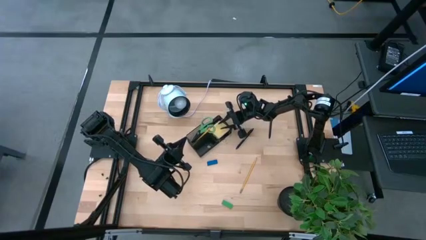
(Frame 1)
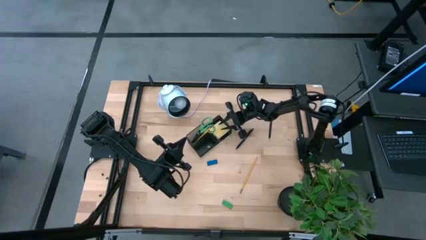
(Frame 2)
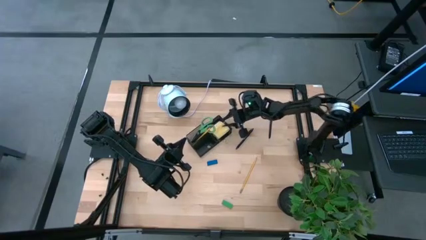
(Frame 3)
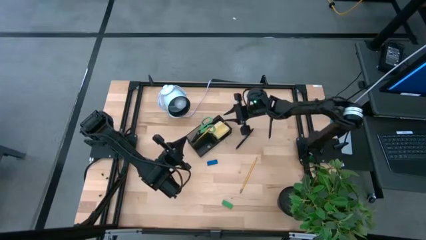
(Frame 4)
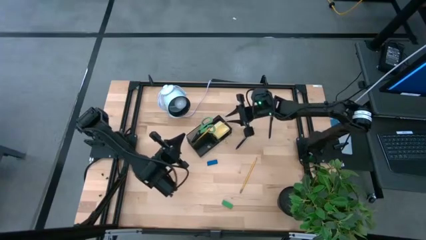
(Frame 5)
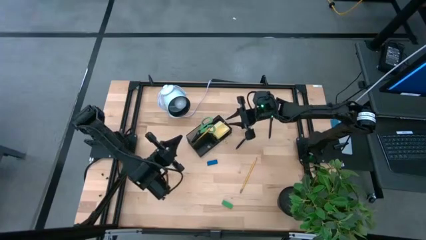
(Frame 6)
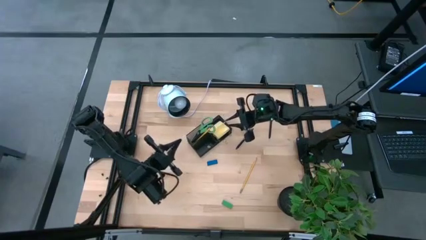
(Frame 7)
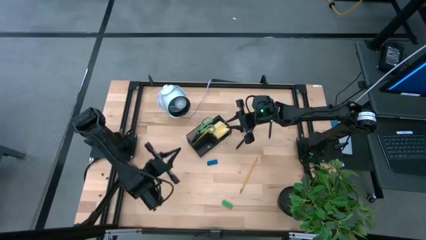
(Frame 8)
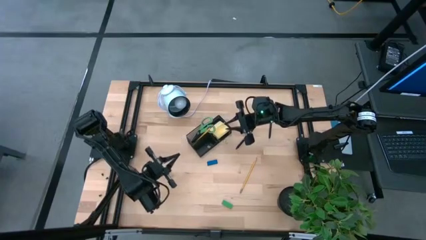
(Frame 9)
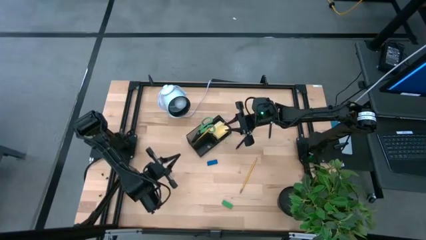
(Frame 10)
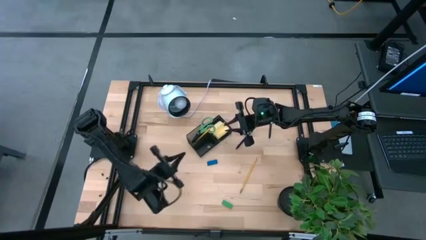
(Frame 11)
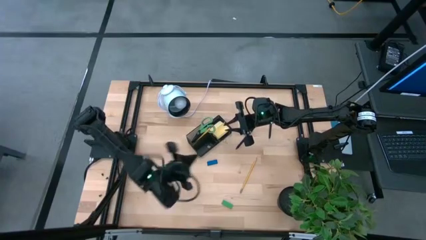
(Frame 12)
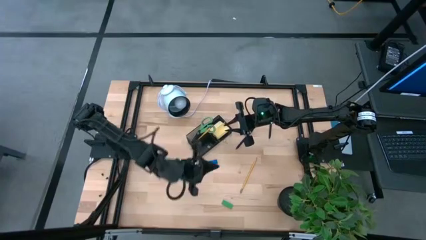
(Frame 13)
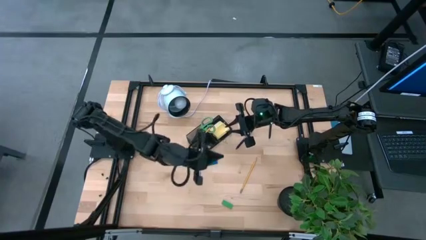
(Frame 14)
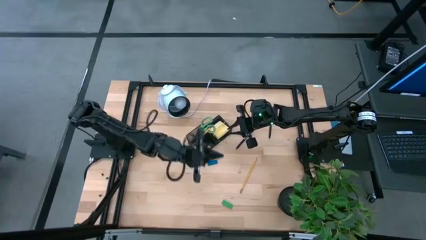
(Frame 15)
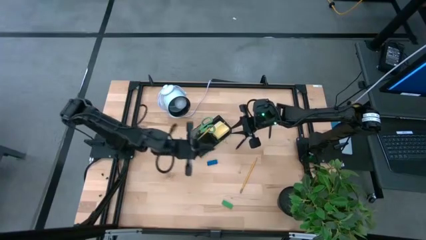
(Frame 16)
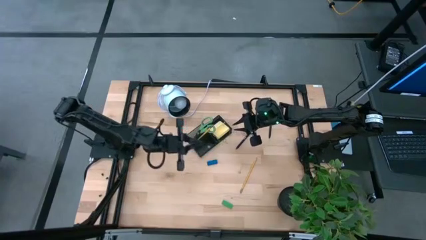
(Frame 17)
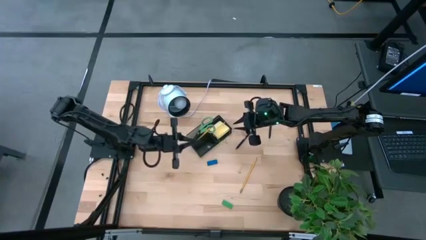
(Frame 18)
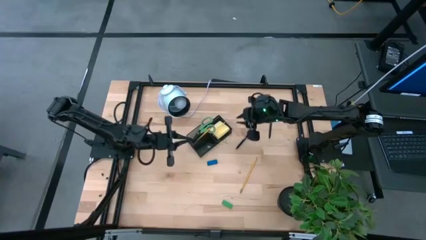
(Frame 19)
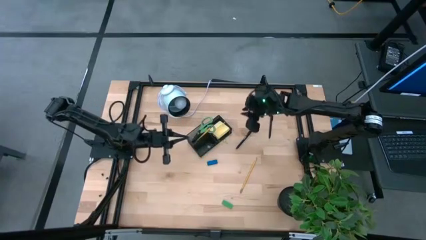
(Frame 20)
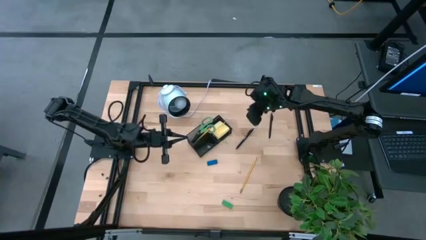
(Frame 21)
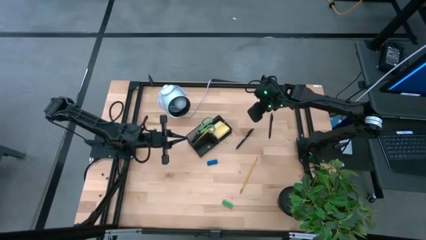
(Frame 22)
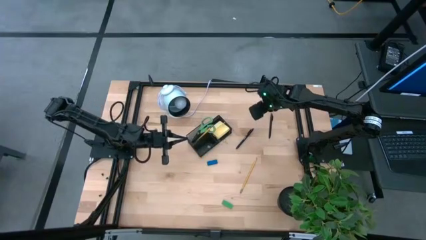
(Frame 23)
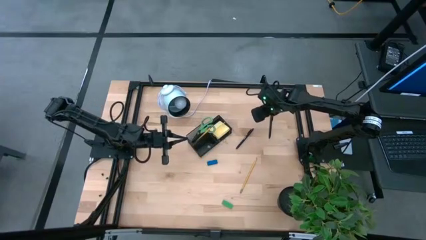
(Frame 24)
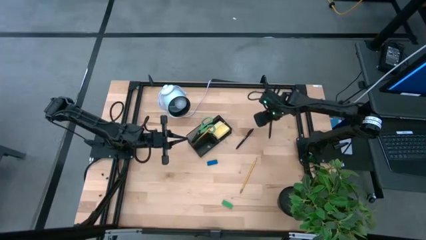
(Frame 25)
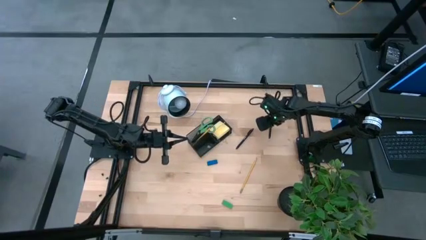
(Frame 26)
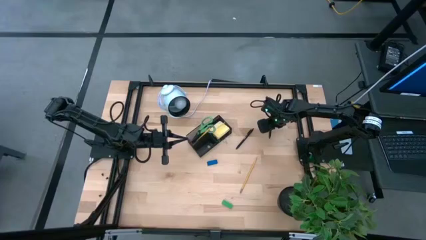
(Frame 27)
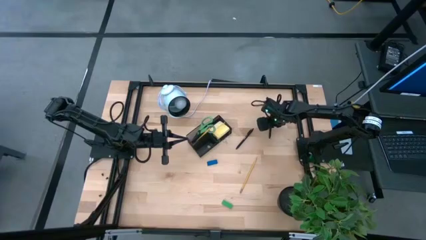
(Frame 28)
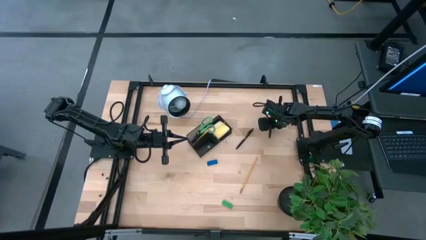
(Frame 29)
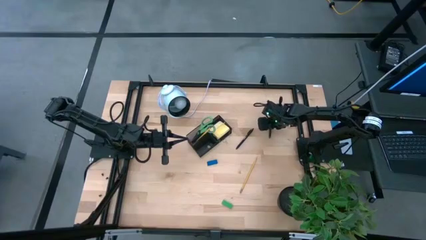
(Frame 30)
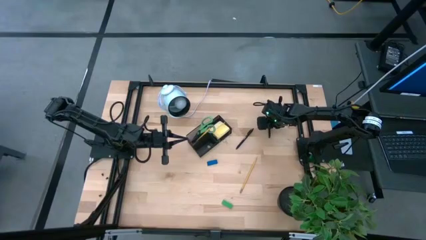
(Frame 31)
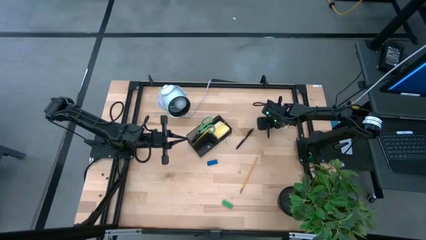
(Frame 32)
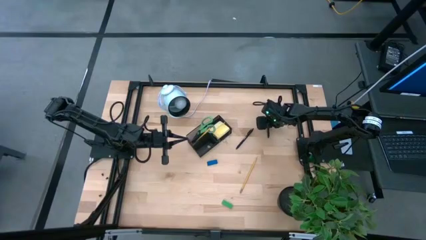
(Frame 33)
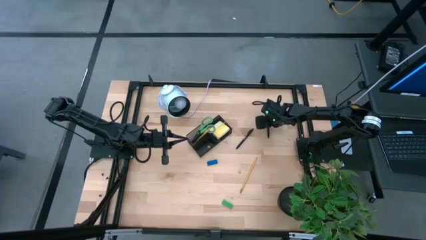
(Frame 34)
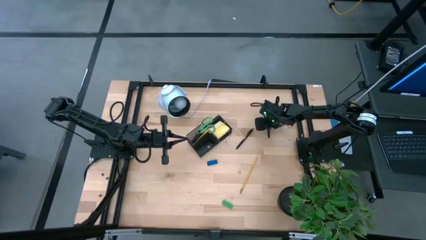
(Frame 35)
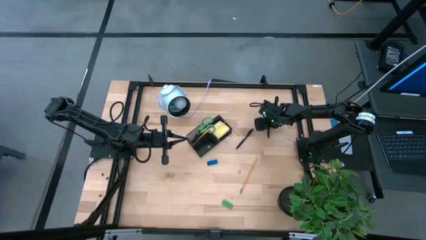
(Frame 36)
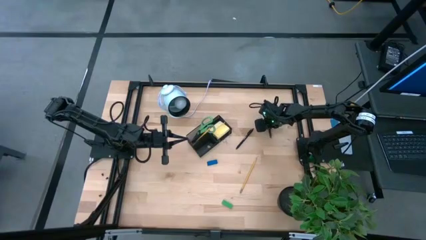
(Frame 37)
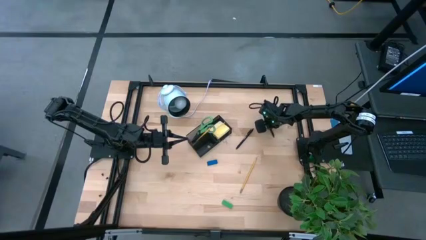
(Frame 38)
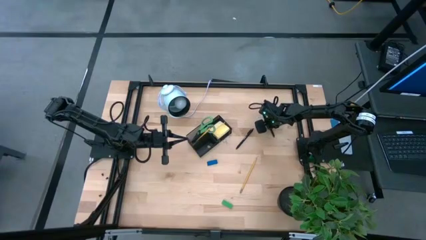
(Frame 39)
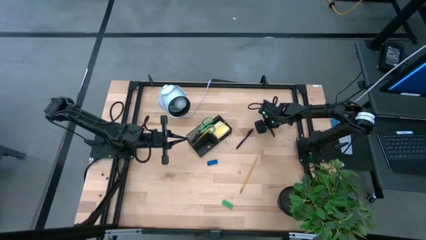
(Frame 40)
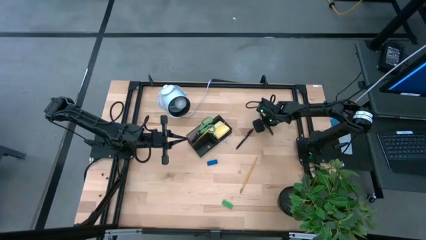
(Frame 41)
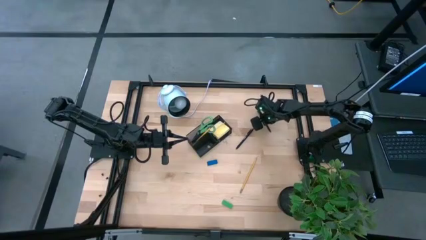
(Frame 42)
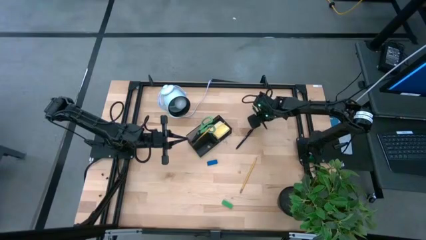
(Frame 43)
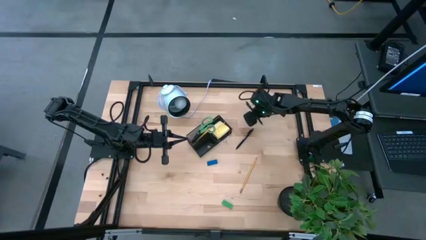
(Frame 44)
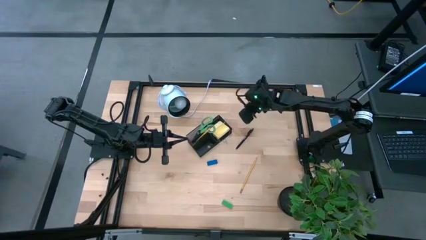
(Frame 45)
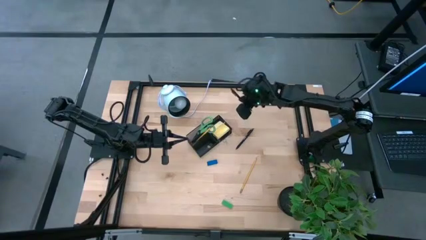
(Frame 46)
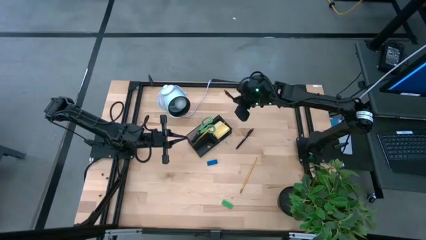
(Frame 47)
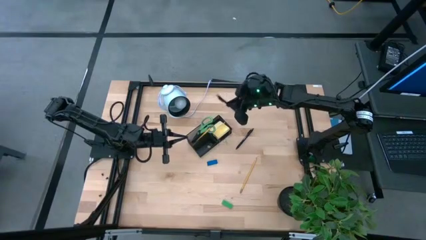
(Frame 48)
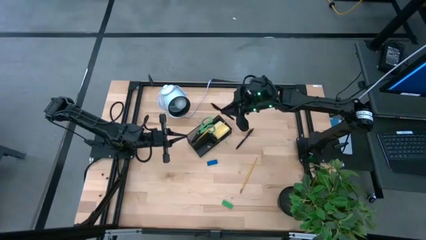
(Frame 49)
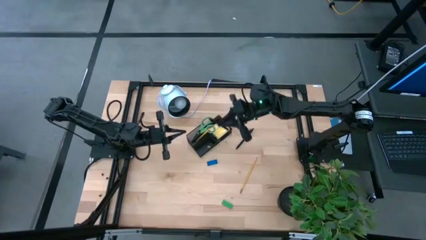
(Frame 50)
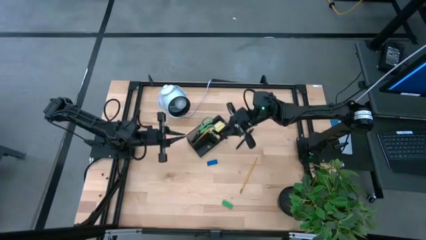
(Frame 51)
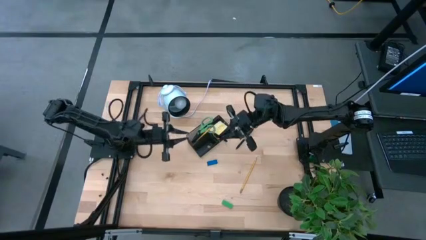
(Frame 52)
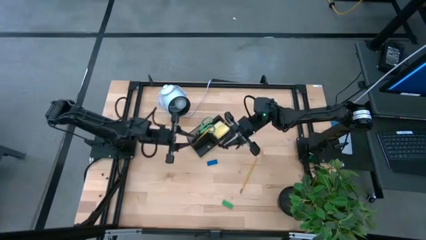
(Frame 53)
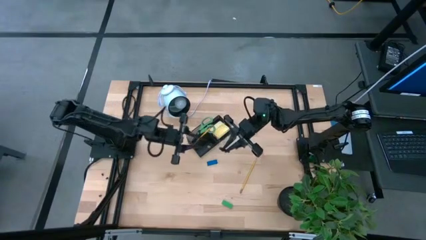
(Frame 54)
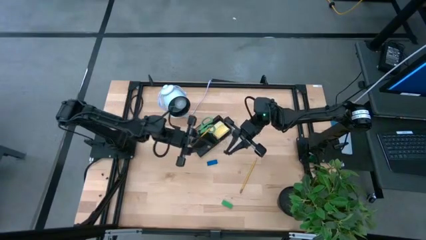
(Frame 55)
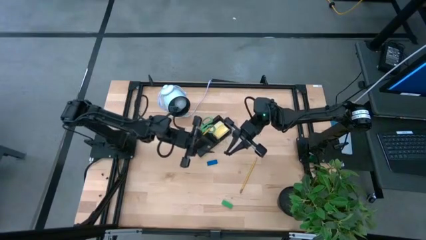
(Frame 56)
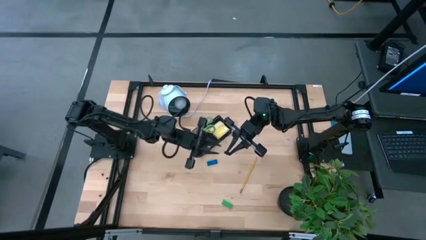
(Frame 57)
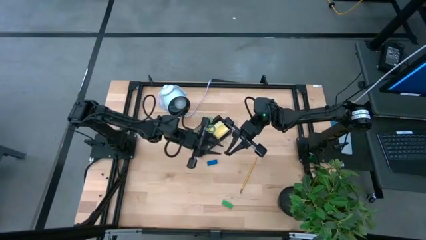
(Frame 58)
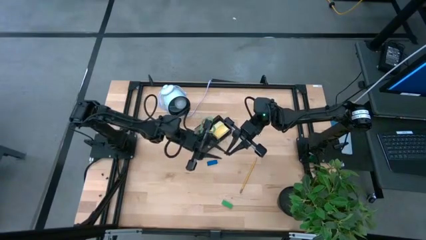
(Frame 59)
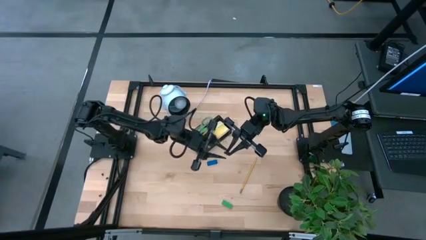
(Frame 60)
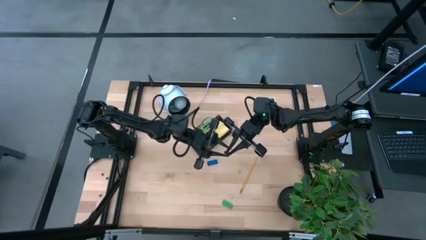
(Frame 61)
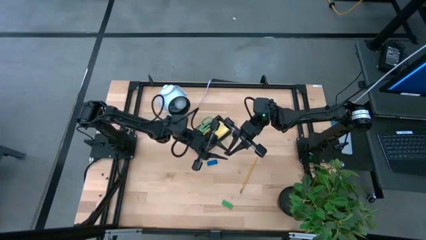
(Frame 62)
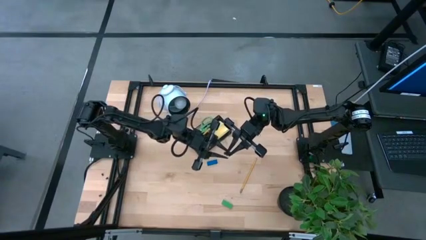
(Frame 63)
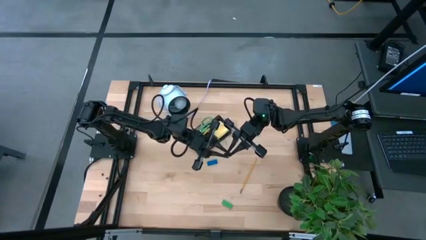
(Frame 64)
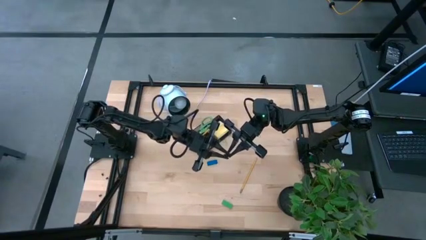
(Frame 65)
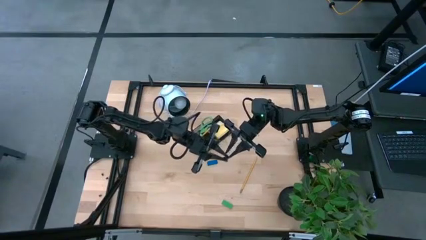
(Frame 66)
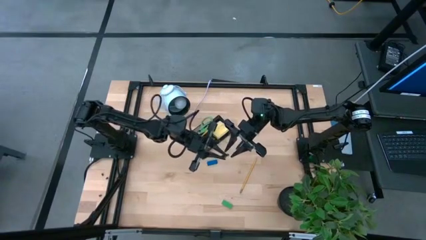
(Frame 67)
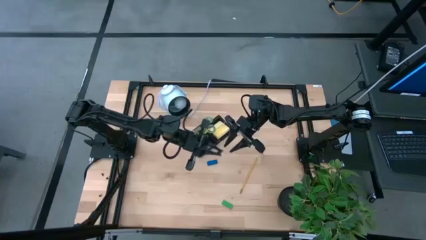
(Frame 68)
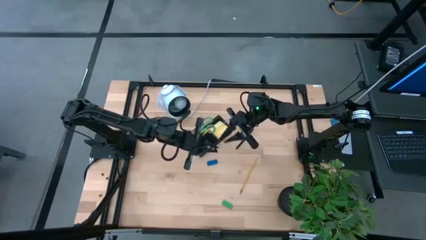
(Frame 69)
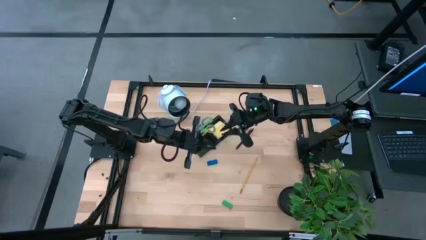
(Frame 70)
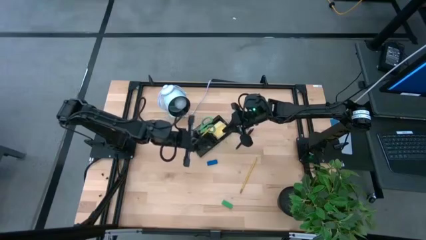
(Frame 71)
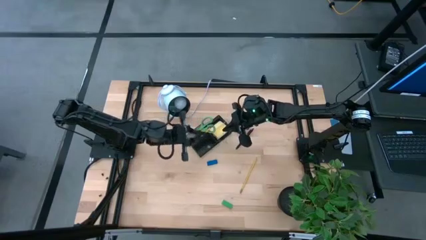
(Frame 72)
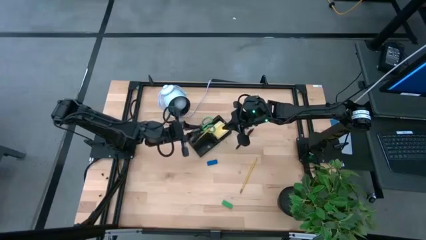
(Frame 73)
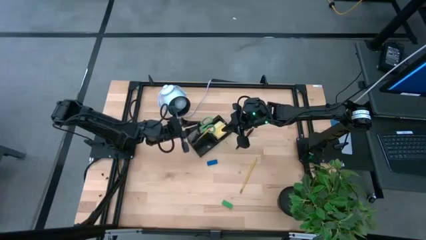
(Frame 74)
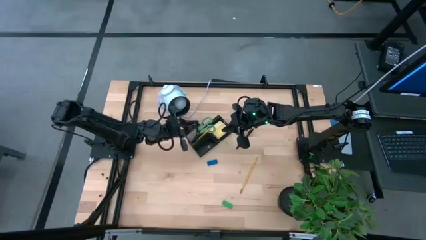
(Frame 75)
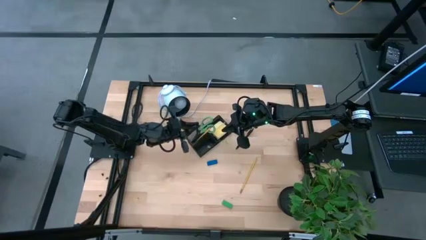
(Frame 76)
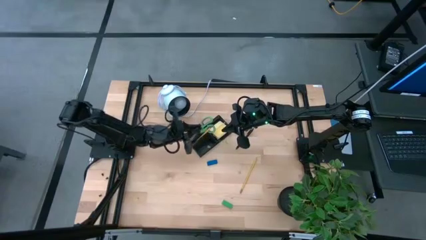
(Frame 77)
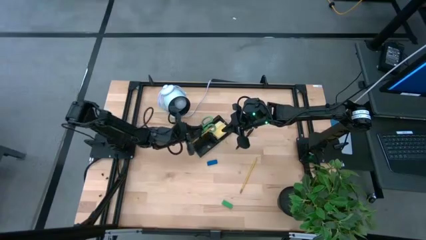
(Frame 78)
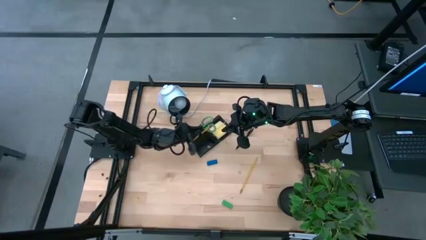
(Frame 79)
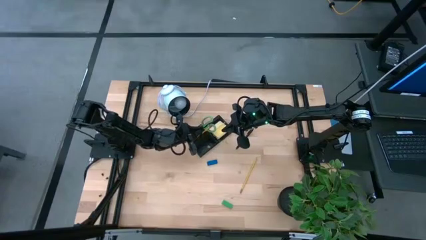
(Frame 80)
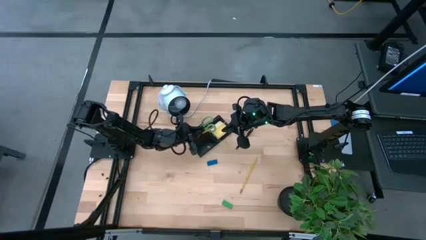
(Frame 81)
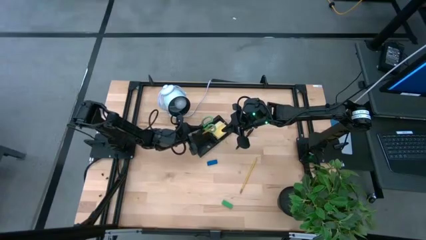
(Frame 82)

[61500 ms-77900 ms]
Task: Pick and place office supplies into organizer
Put the black pen into the black desk organizer
